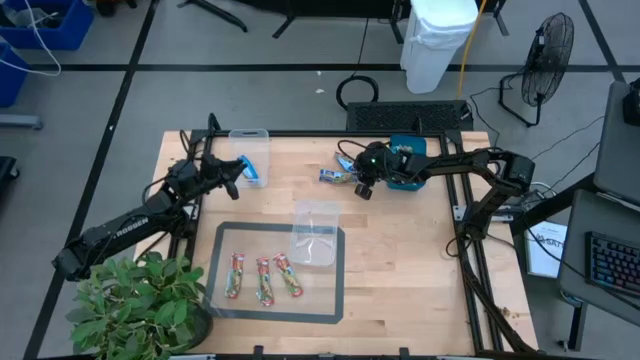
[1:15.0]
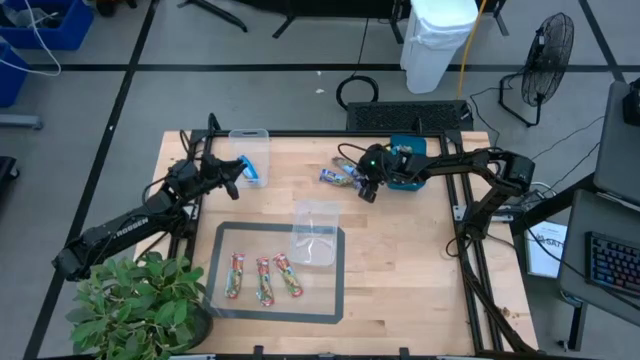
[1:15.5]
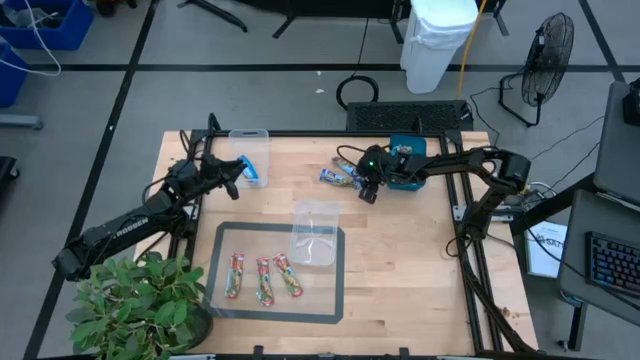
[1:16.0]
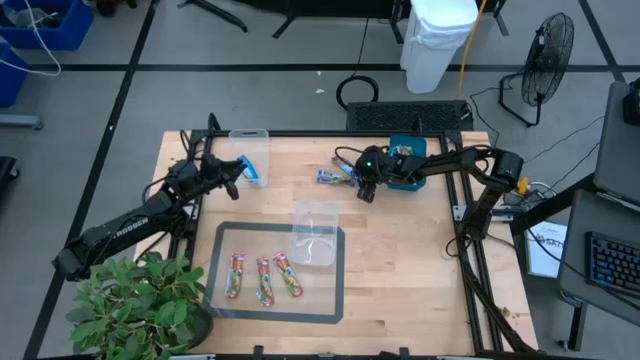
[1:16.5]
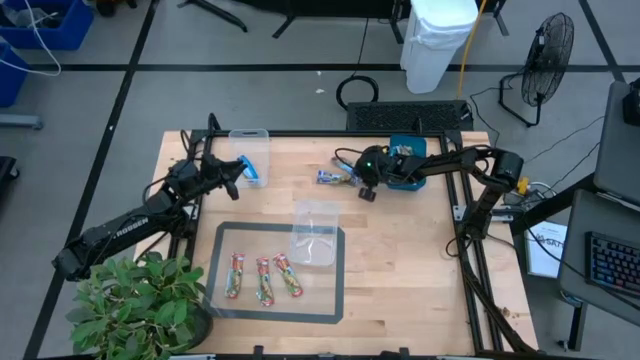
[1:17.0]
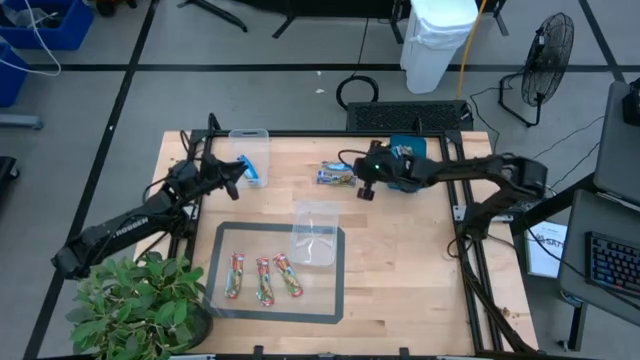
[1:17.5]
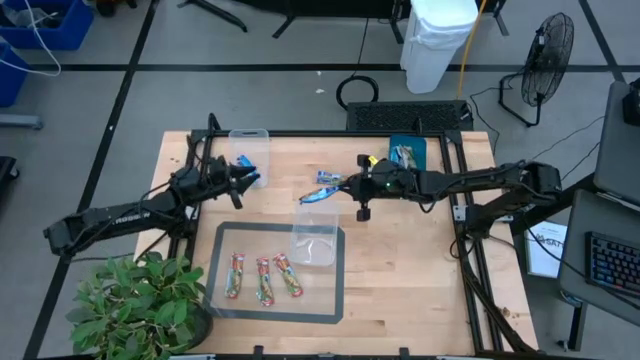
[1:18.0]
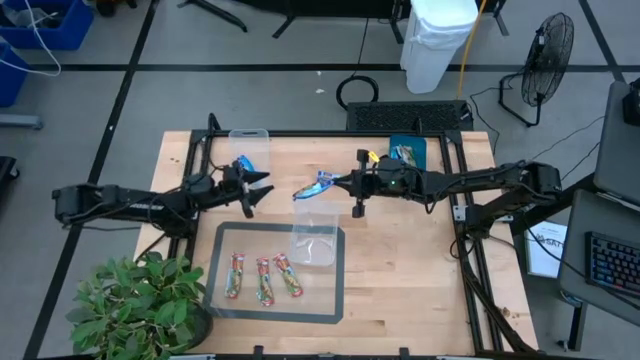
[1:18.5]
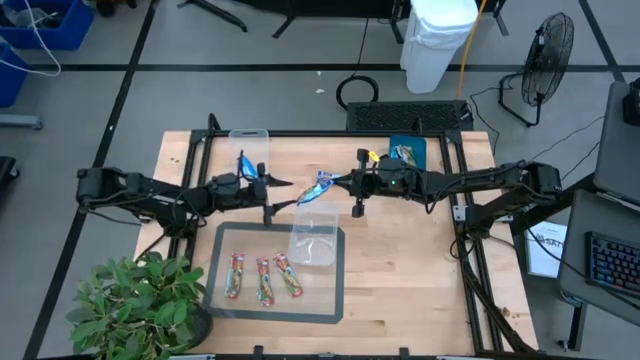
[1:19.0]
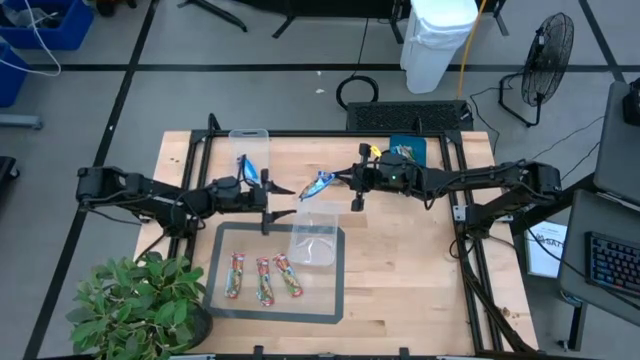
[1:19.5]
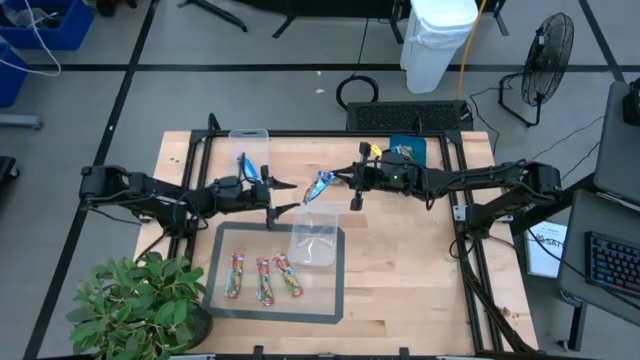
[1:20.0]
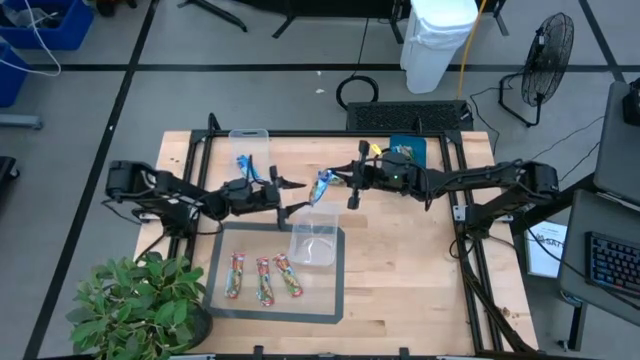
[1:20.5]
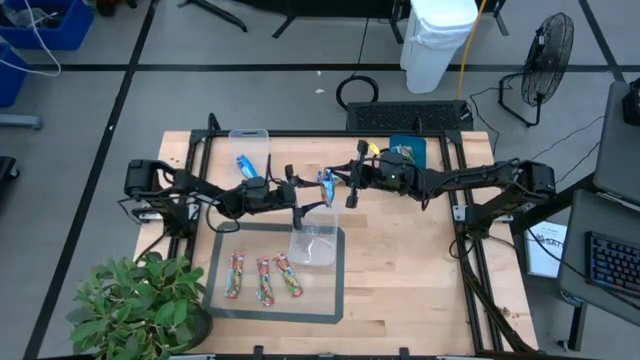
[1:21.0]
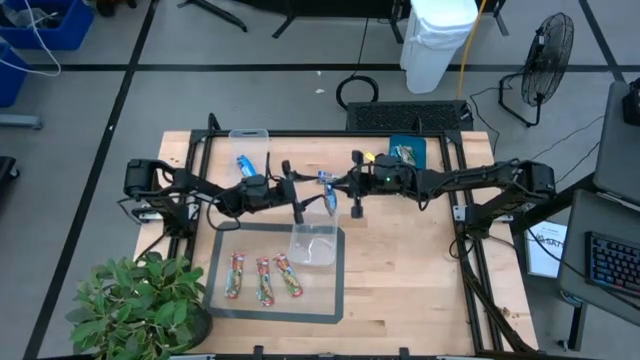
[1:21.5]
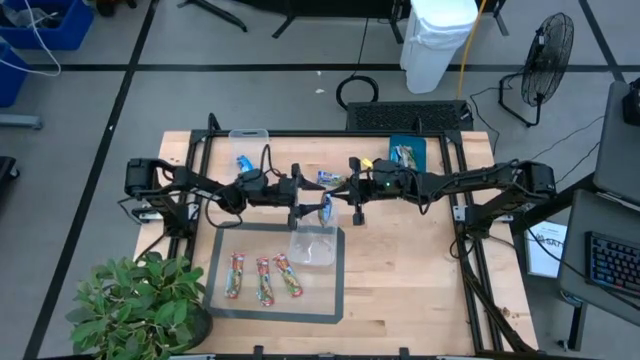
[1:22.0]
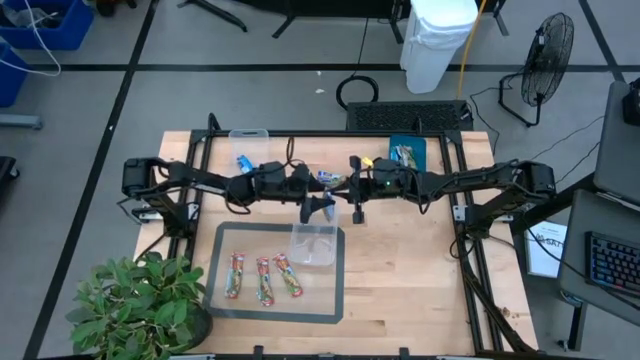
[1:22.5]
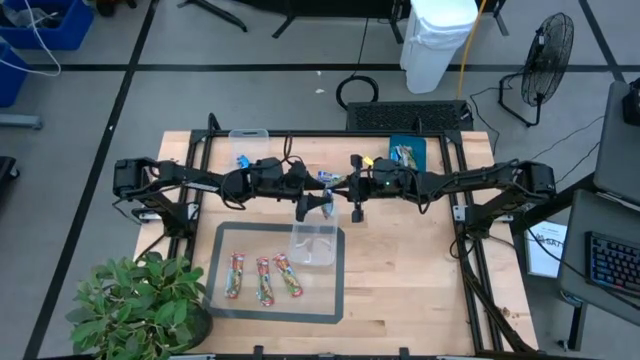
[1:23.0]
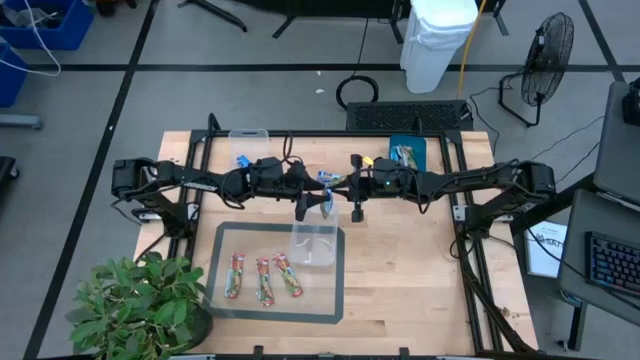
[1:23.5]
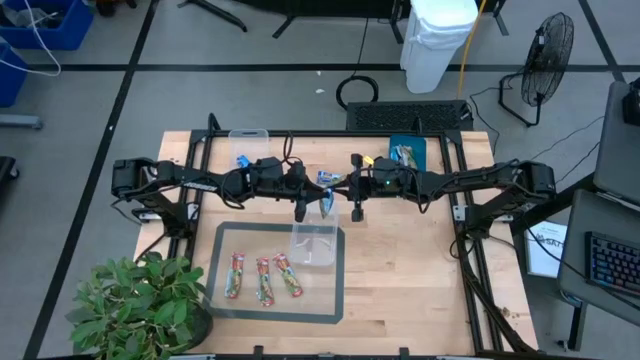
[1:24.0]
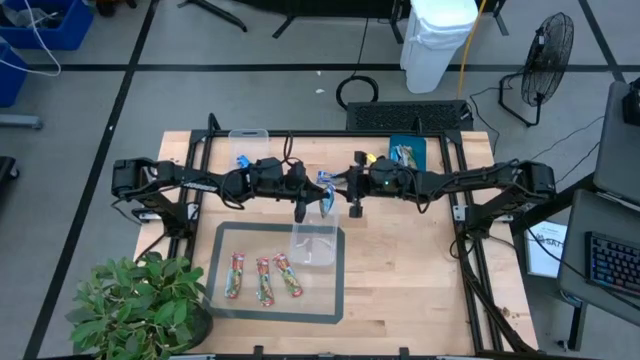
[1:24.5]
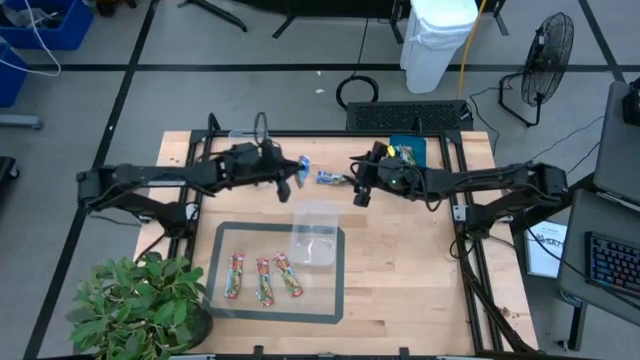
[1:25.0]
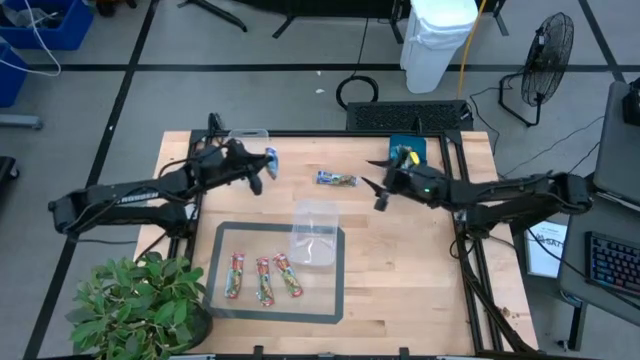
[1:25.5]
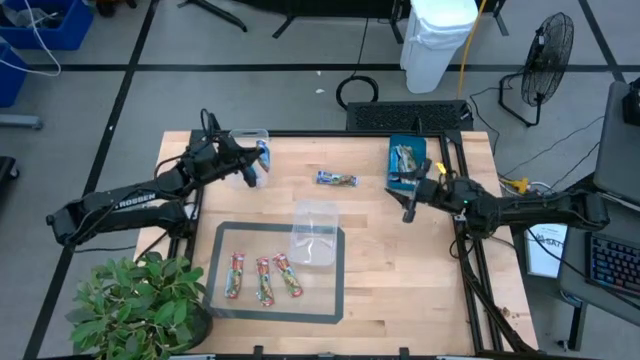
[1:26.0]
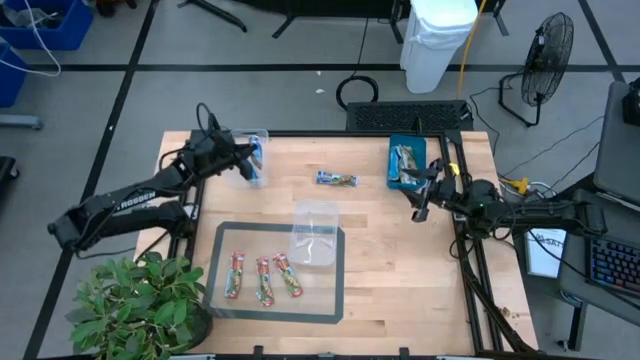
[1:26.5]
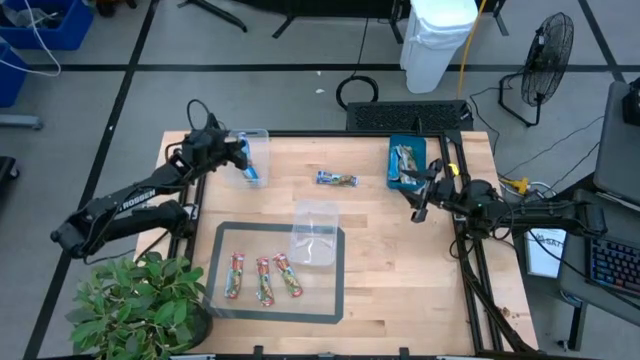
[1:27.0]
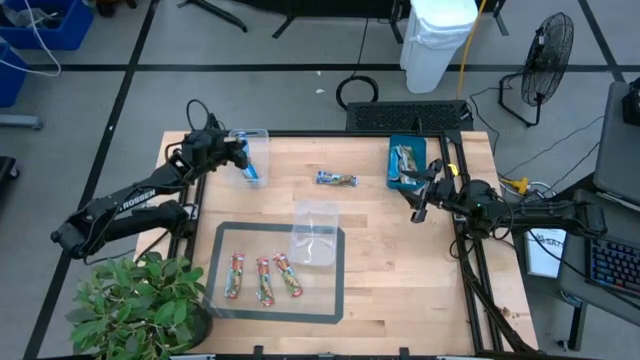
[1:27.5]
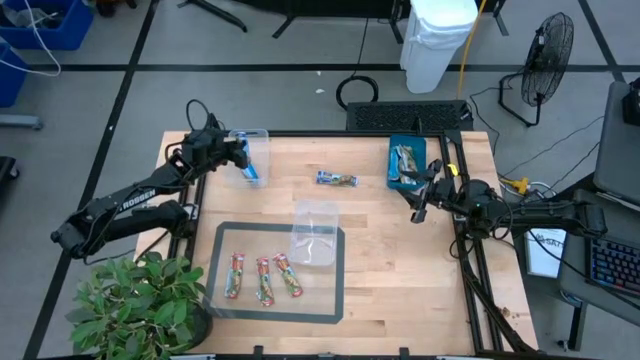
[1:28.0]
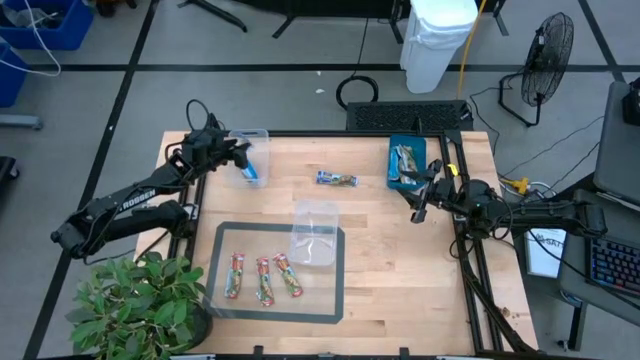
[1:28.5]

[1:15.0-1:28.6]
Task: Pick and place Granola Bars by type
Put the blue granola bar into the top blue bin

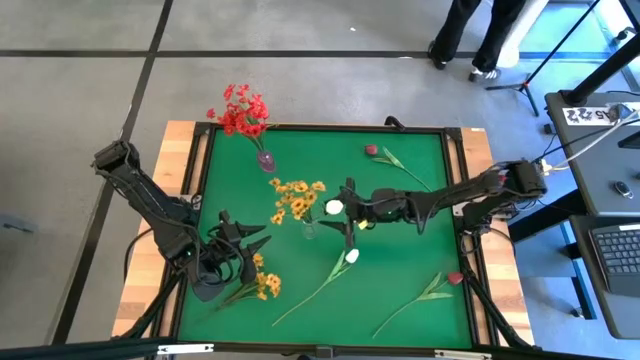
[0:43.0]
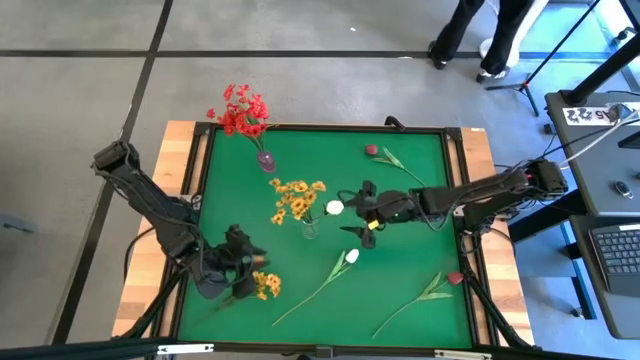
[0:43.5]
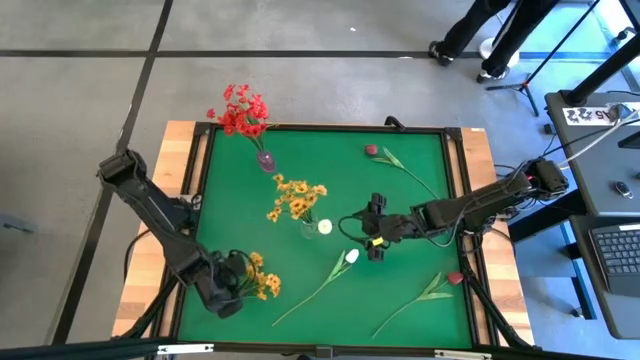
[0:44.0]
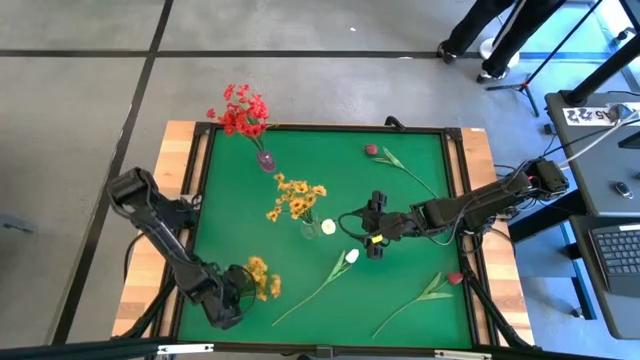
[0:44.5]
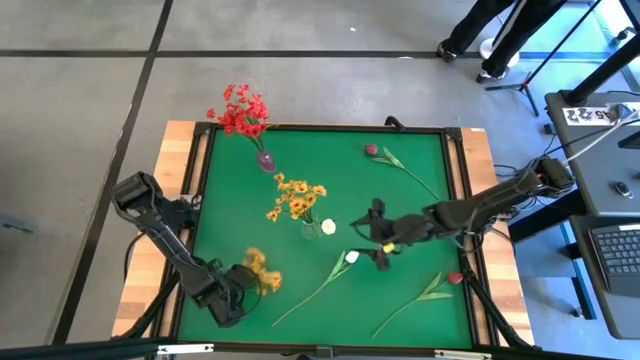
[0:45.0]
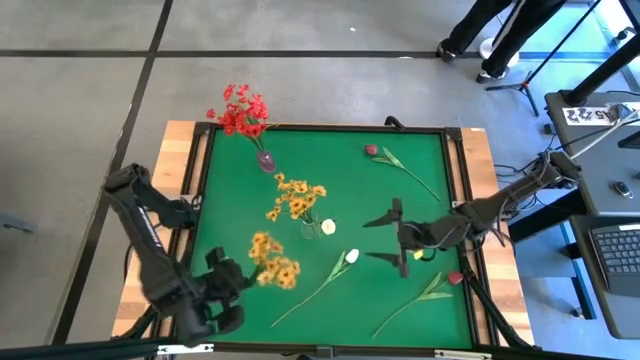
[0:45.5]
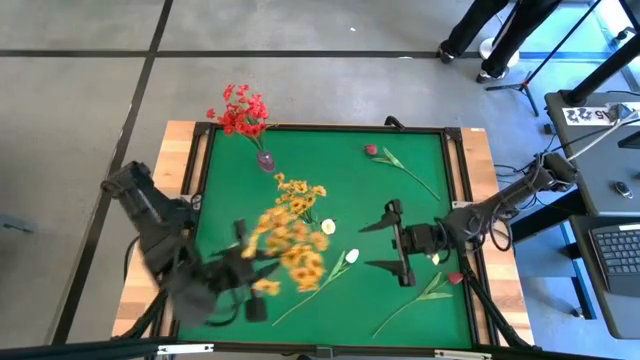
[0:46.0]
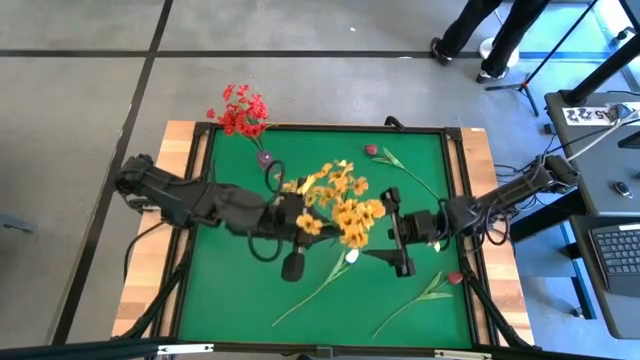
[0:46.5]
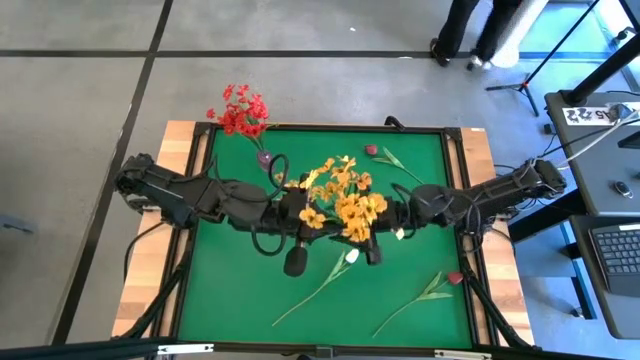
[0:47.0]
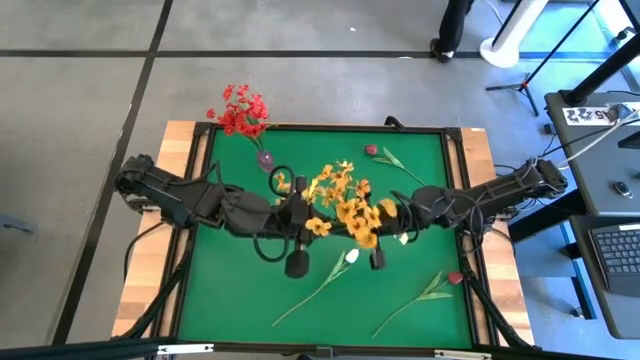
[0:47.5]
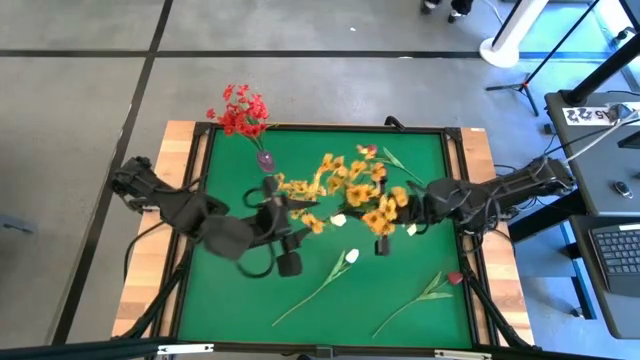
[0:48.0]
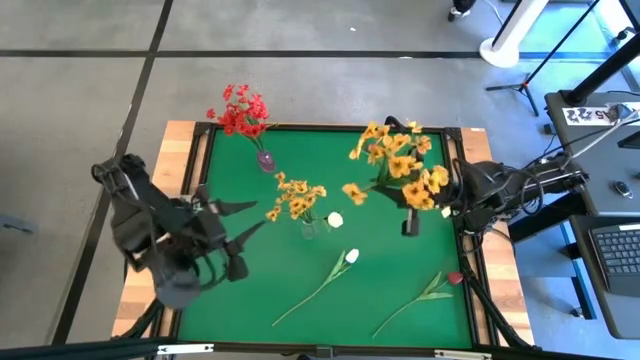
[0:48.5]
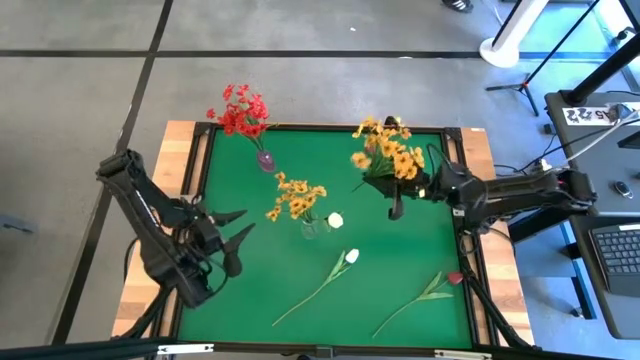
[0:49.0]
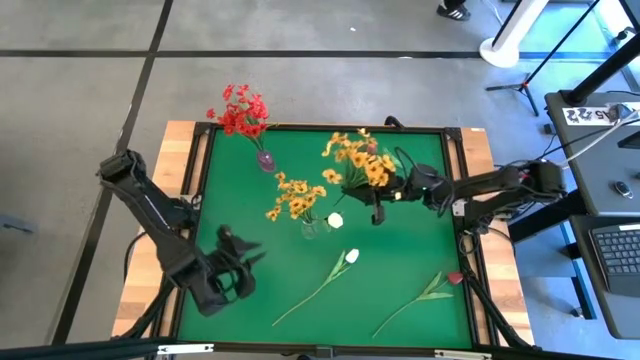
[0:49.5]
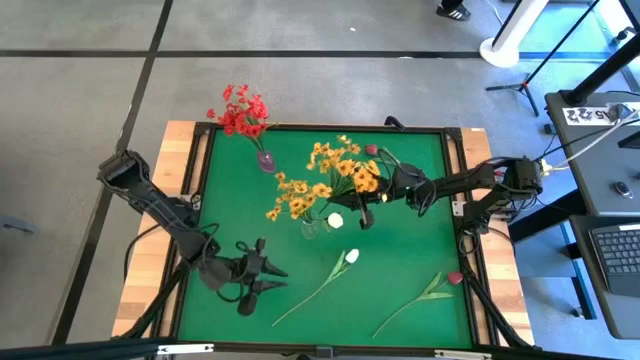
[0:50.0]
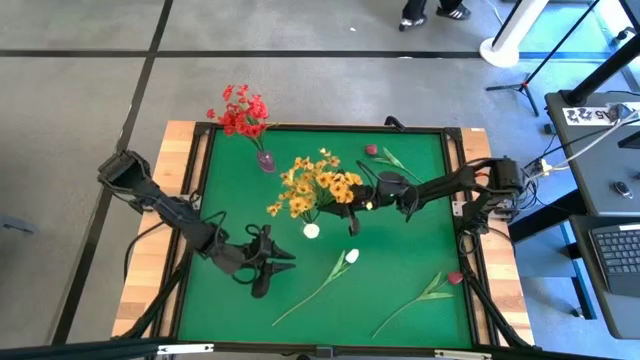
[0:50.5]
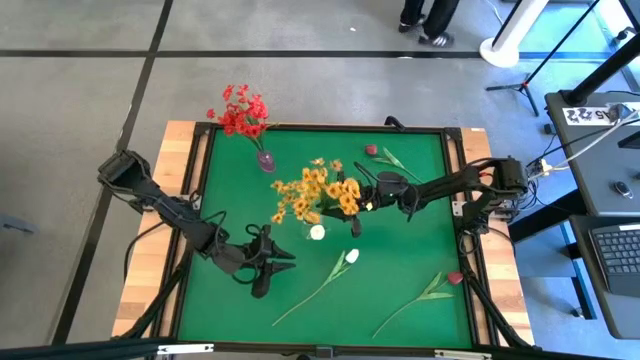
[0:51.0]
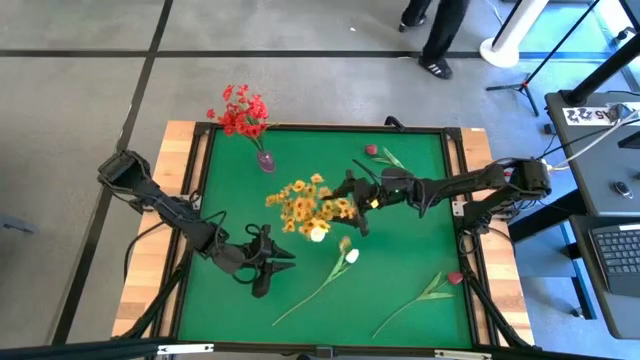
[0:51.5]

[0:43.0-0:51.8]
Task: Sort flowers into vase by color
Put the yellow flowers into the transparent vase
